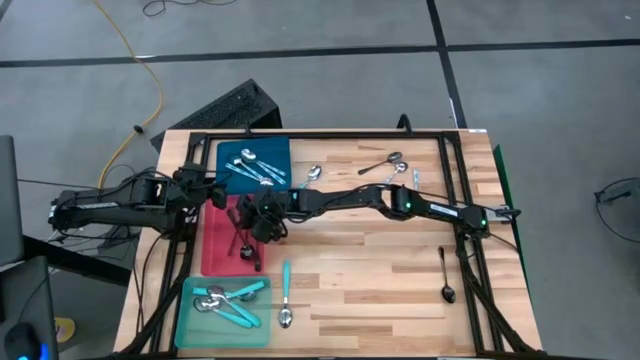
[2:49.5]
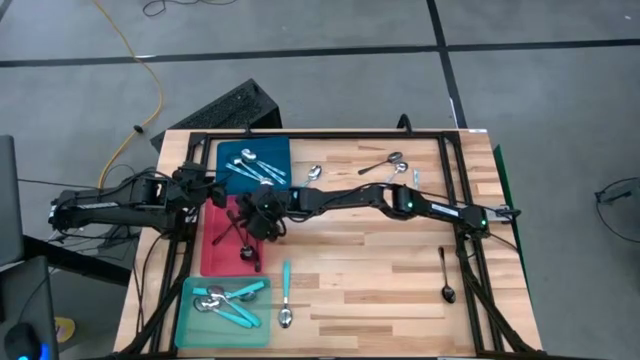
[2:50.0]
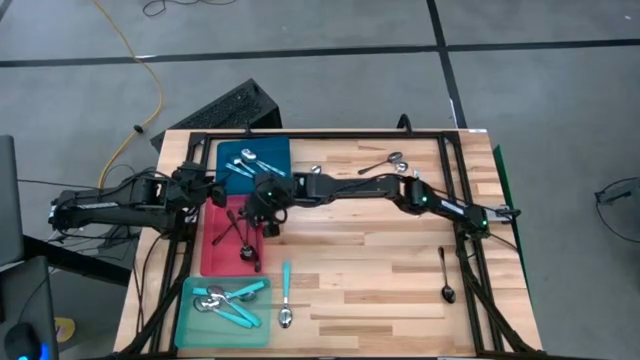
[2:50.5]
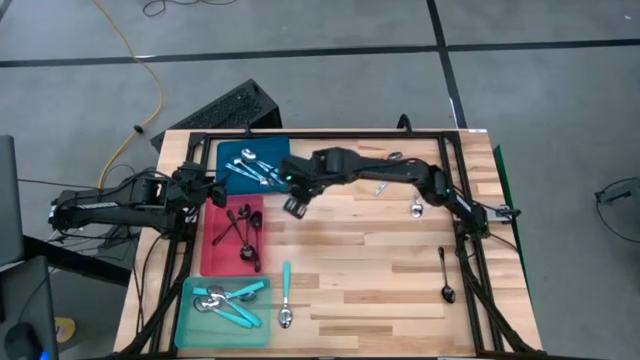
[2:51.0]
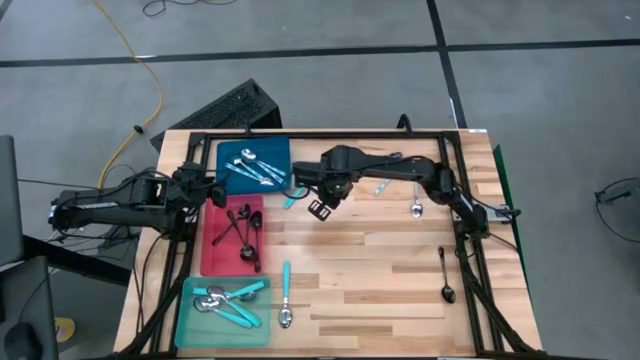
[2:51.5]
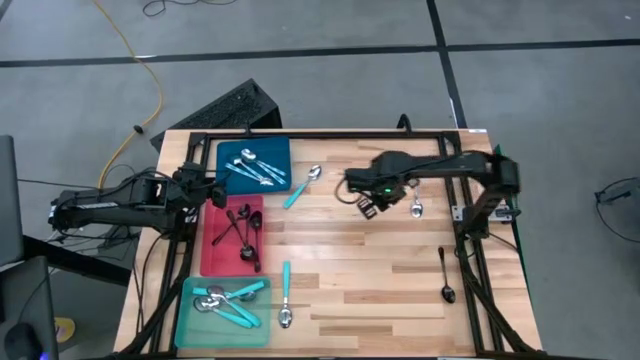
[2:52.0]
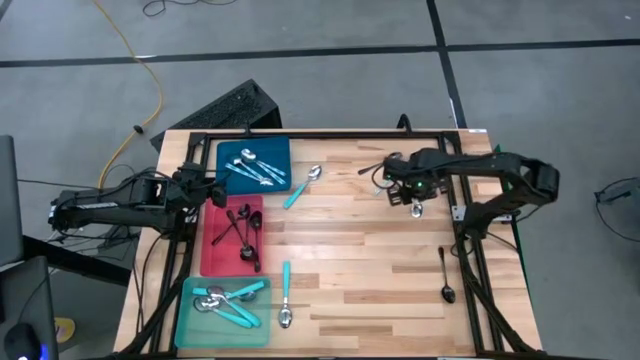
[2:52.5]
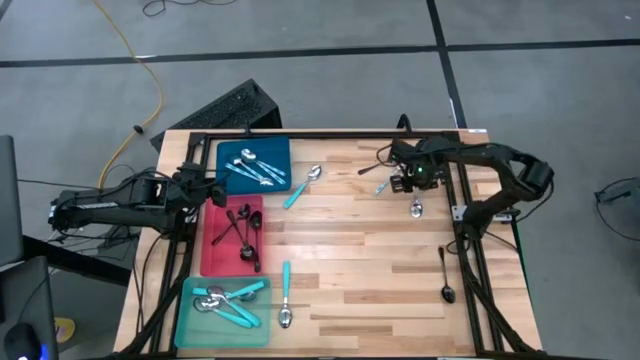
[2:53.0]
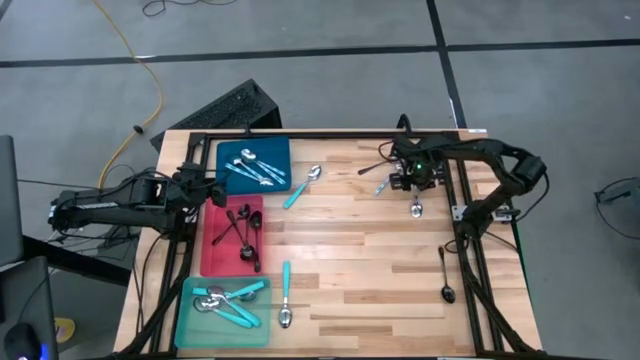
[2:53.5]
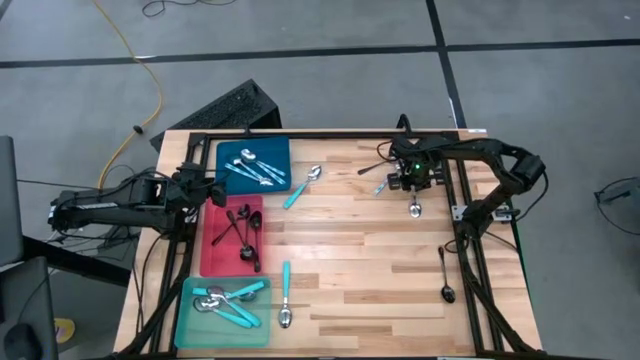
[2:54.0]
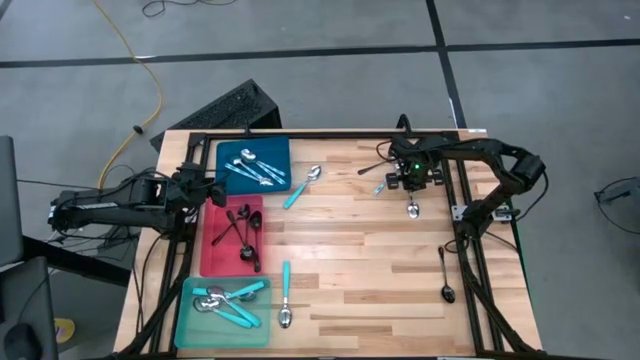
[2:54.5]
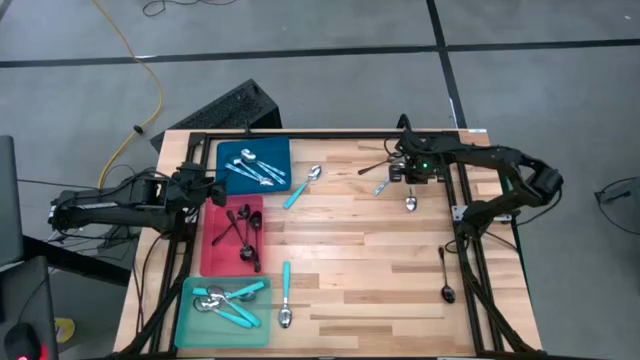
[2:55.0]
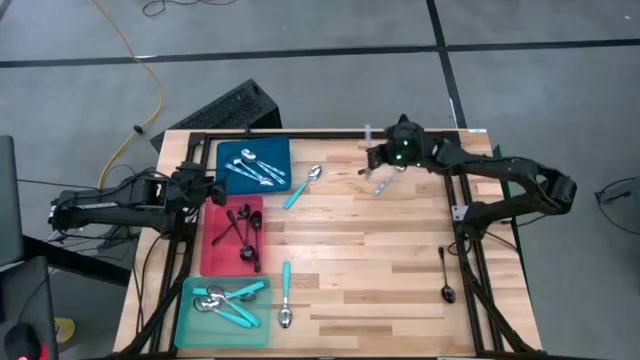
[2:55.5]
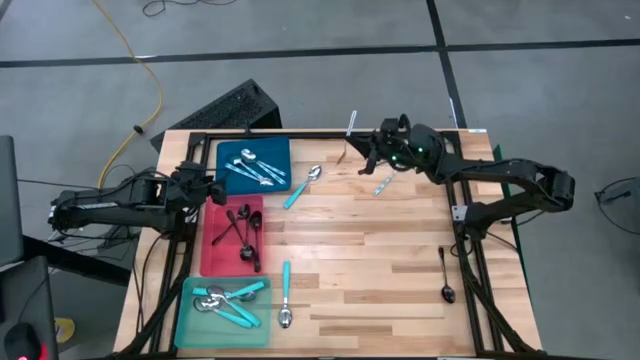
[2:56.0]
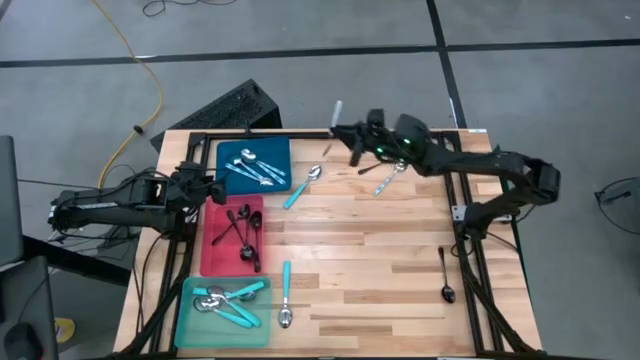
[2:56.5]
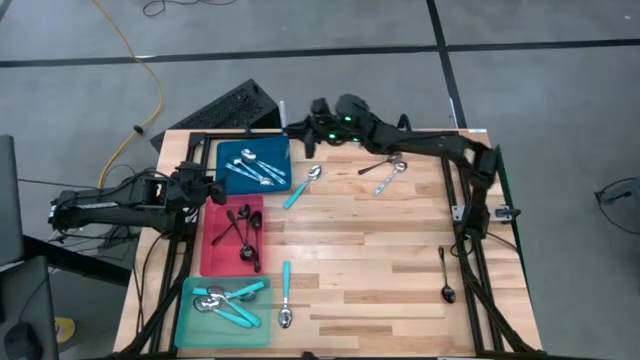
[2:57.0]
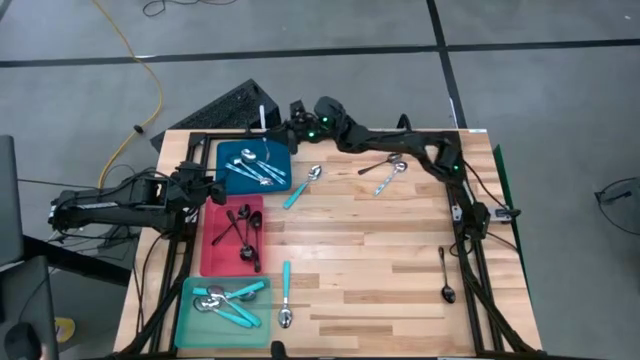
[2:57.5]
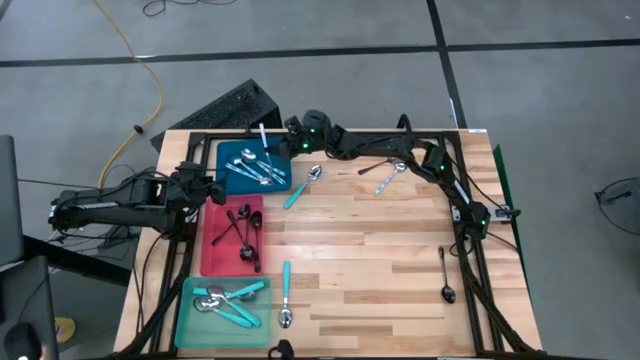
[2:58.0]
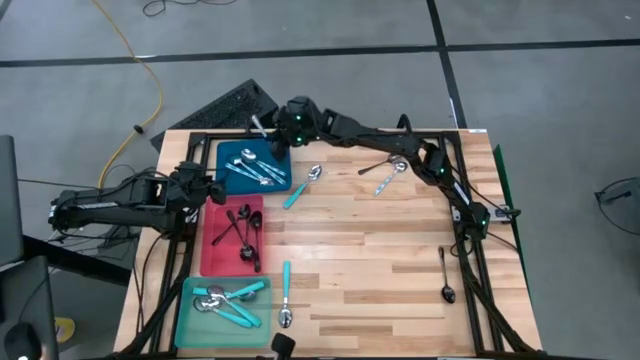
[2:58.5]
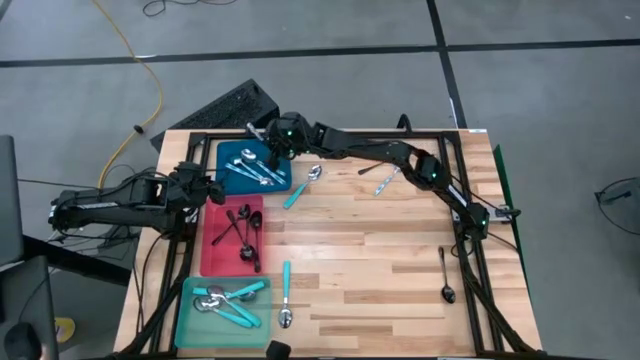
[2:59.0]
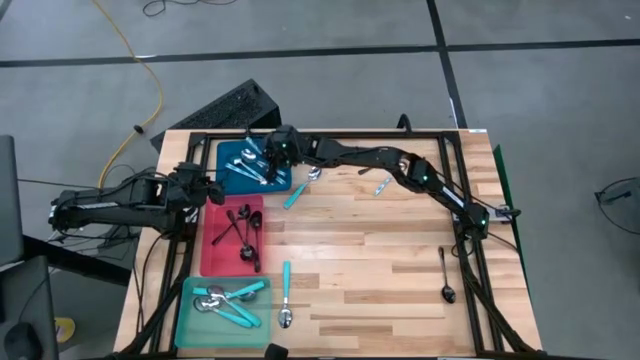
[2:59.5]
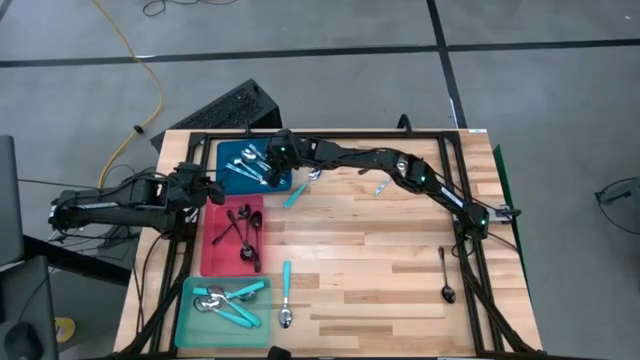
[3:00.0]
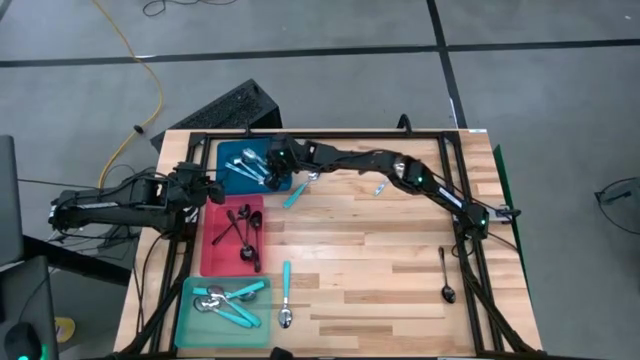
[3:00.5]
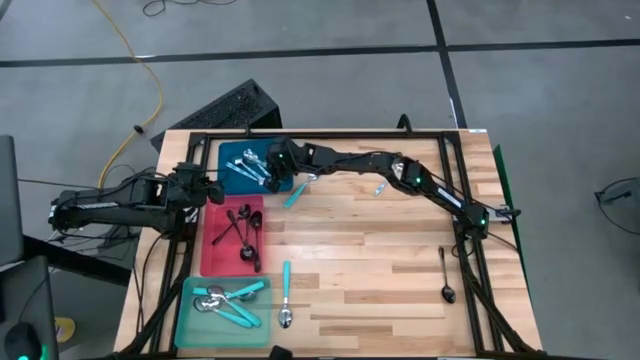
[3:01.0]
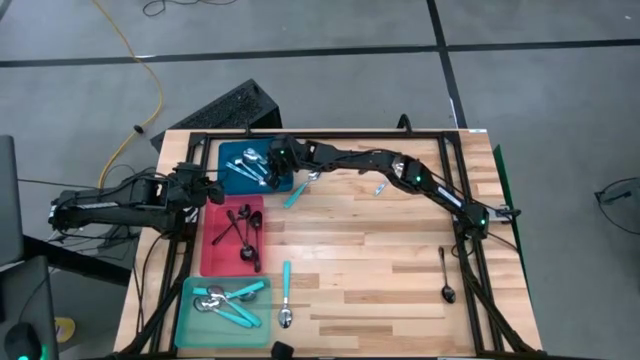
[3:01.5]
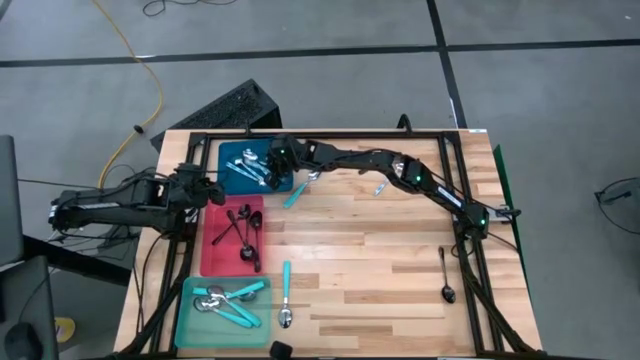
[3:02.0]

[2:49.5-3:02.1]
Task: Sort silverware by color (type)
Put the blue patterned spoon into the blue bin

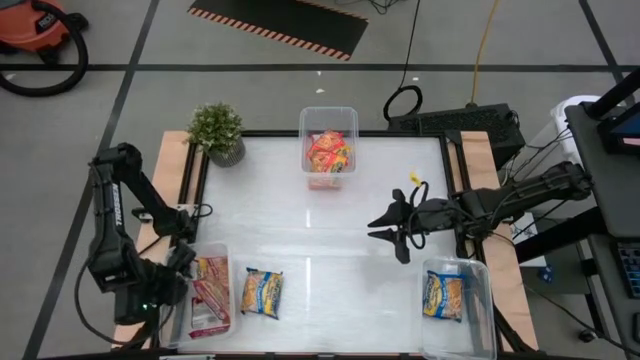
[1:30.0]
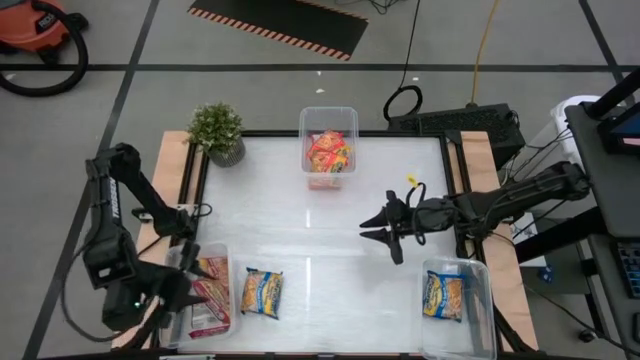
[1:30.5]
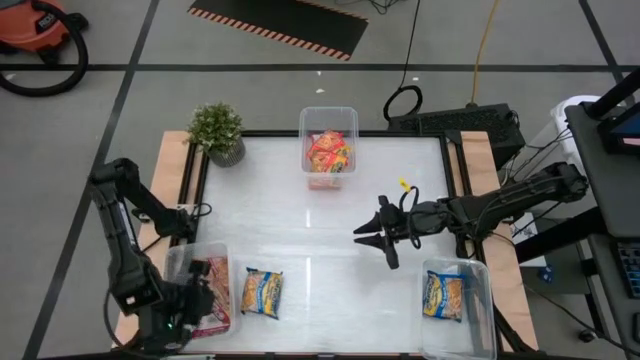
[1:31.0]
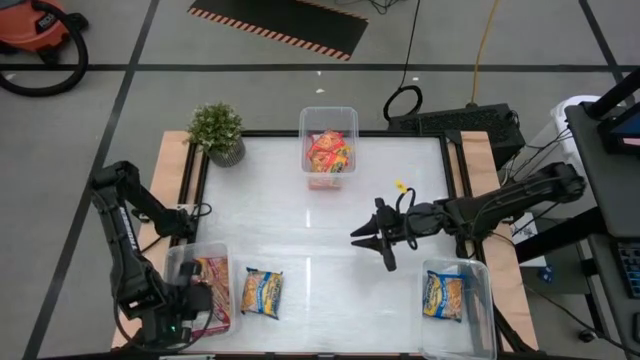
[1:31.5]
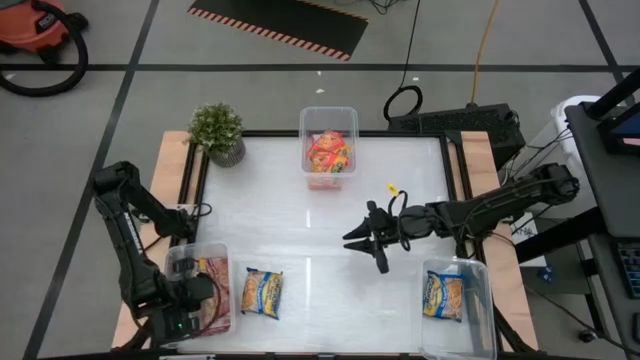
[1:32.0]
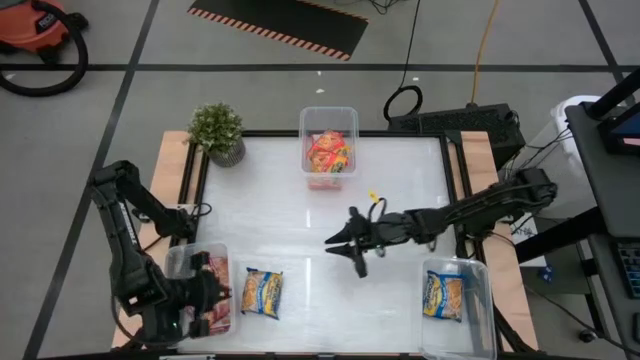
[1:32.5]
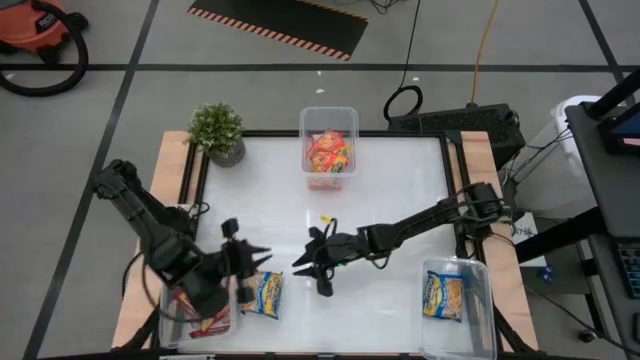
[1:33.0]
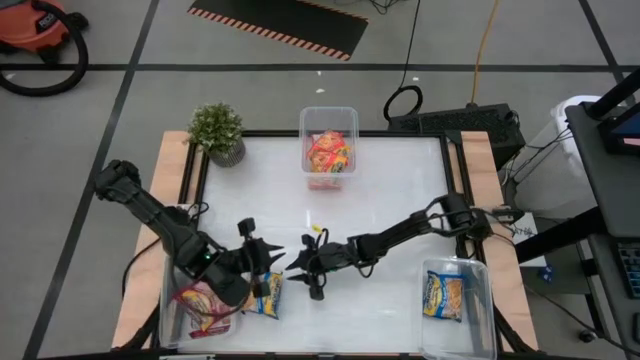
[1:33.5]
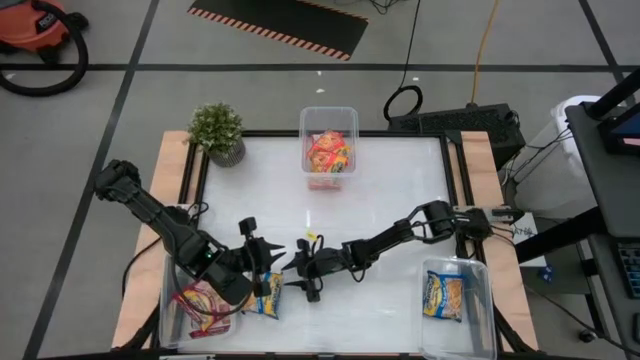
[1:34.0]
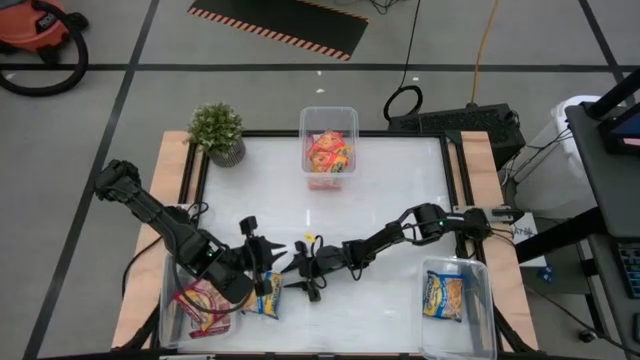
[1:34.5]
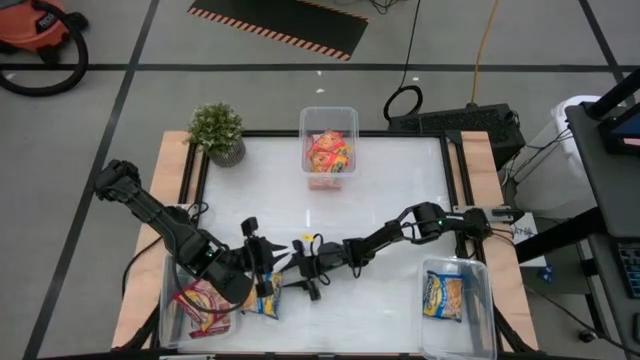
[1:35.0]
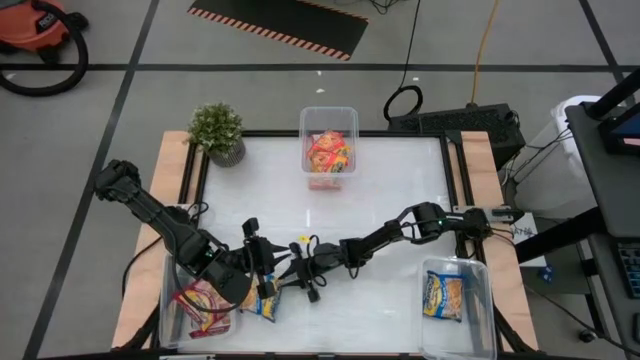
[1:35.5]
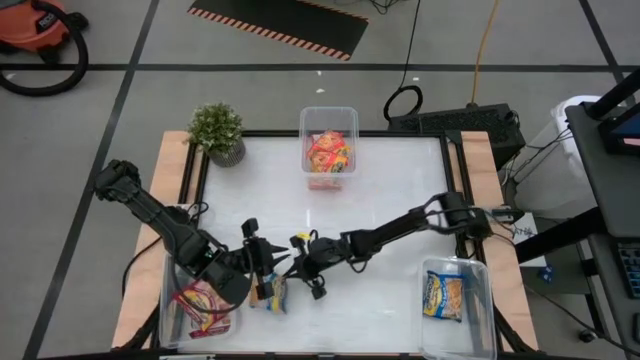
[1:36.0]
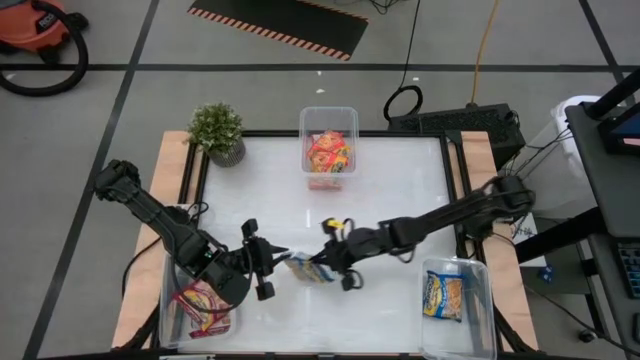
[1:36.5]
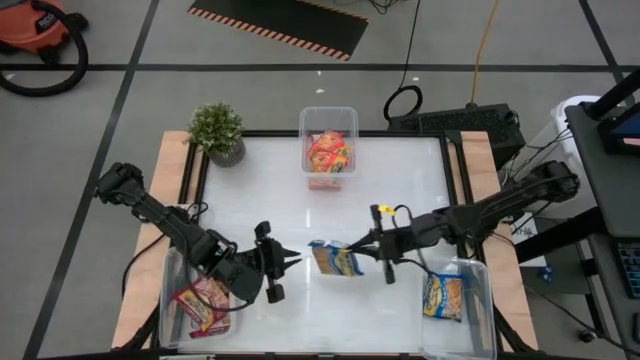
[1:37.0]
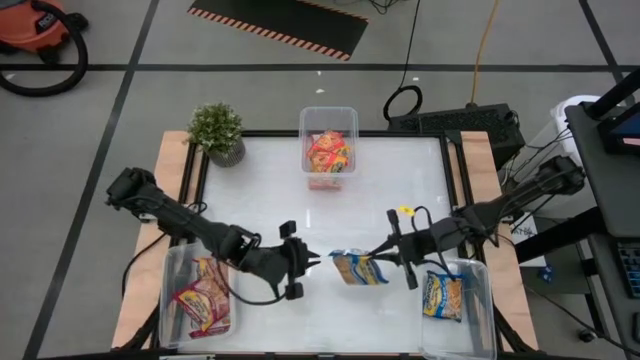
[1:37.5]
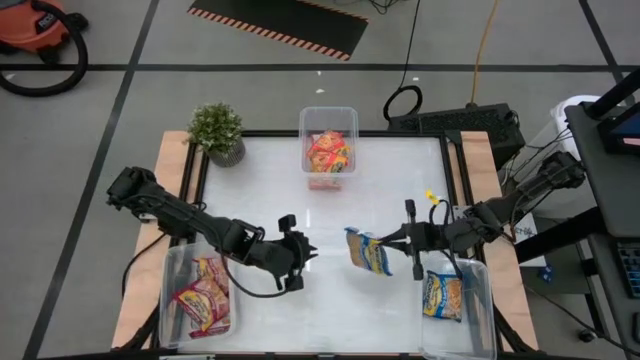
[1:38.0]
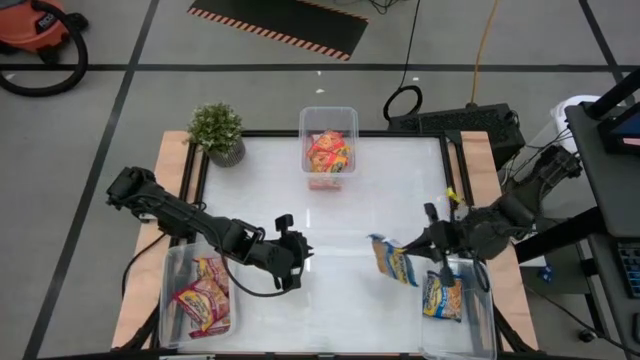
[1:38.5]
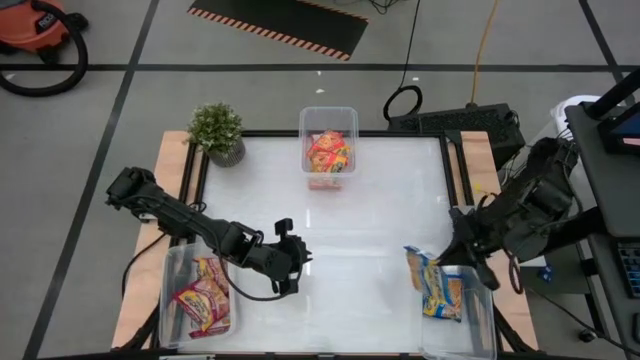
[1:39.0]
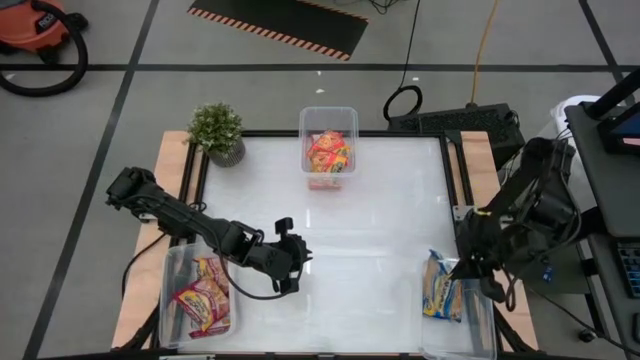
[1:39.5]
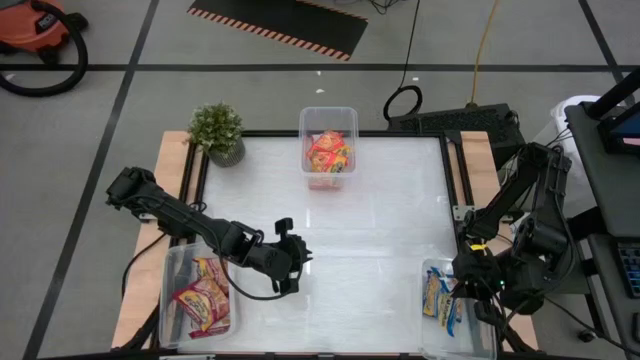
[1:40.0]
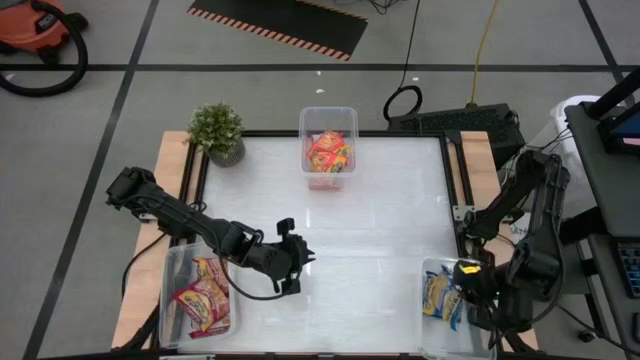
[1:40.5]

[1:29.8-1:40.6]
Task: Sort Maruchan noodles
Put the blue noodle pack into the bottom right transparent bin
